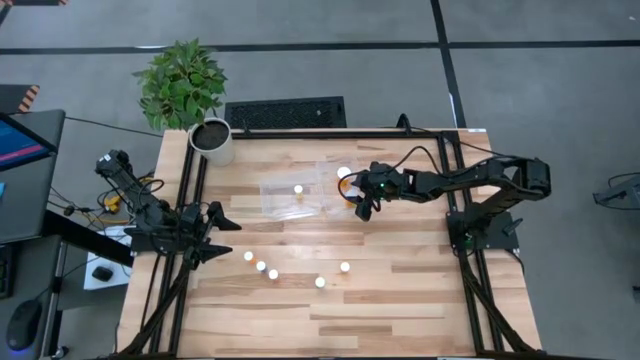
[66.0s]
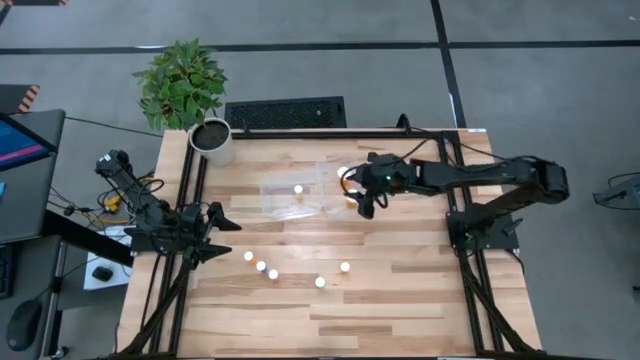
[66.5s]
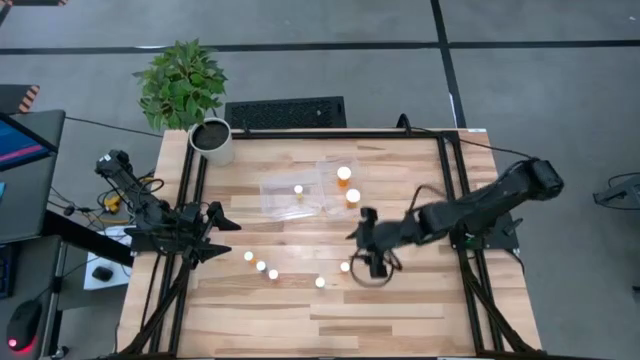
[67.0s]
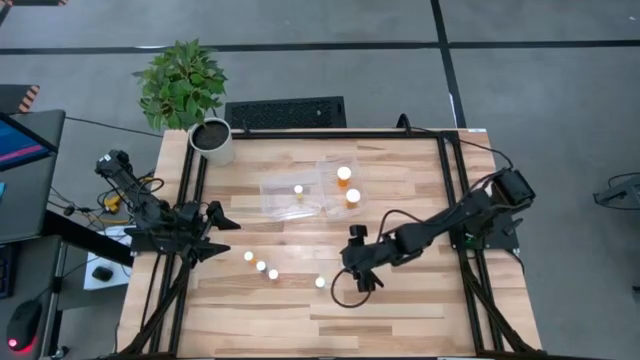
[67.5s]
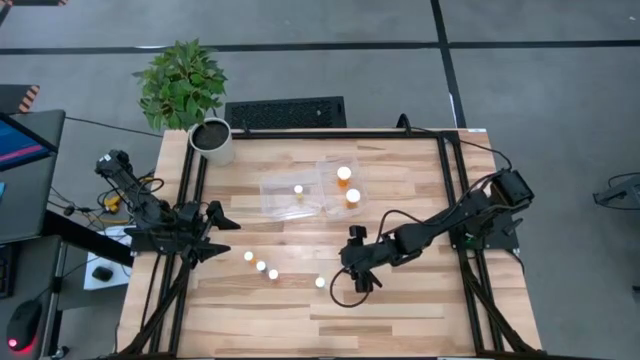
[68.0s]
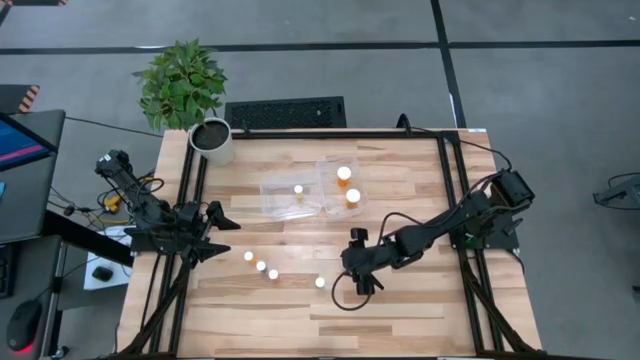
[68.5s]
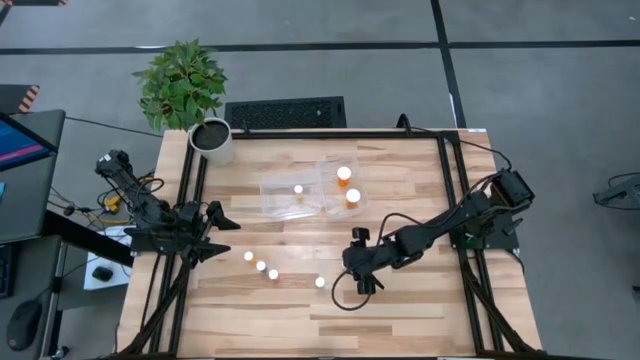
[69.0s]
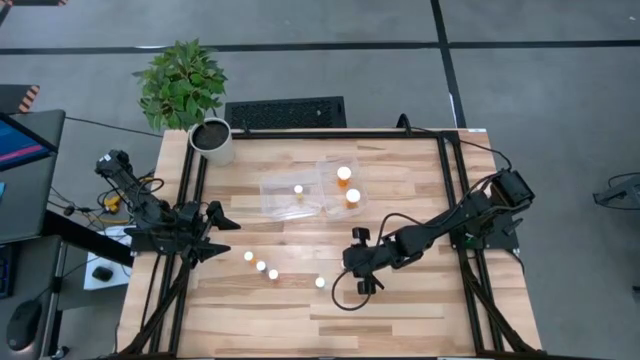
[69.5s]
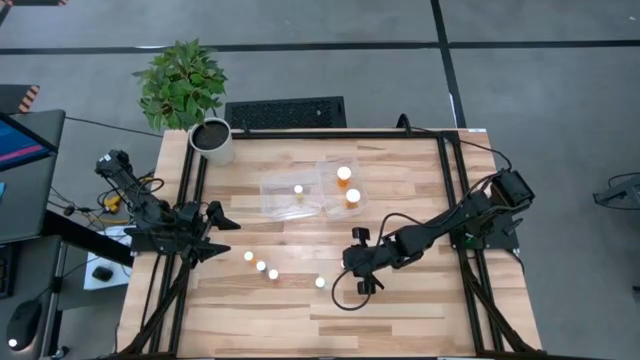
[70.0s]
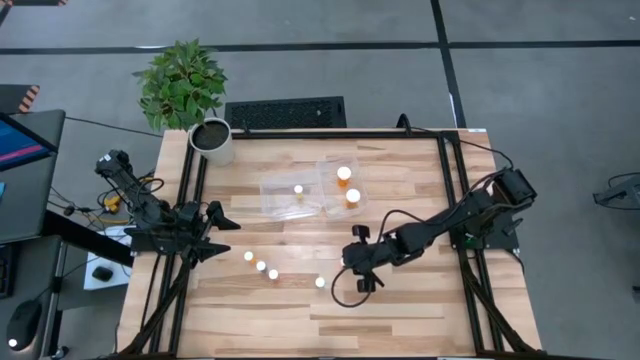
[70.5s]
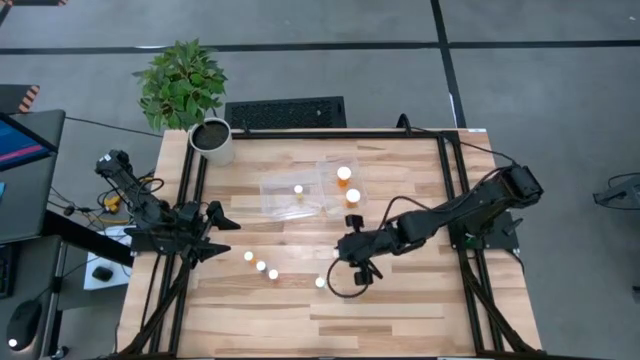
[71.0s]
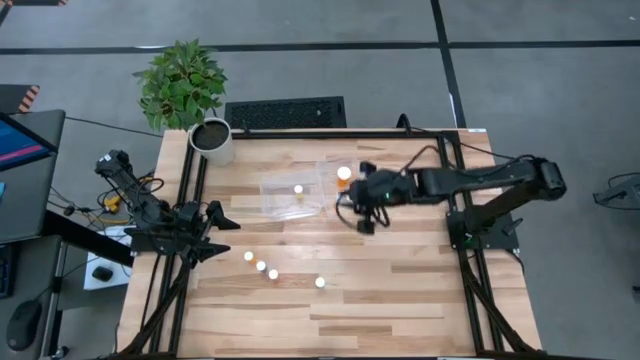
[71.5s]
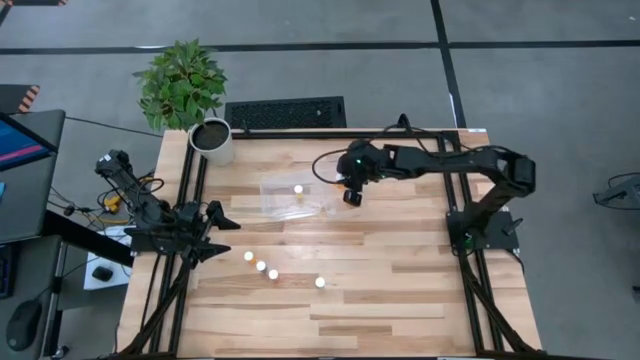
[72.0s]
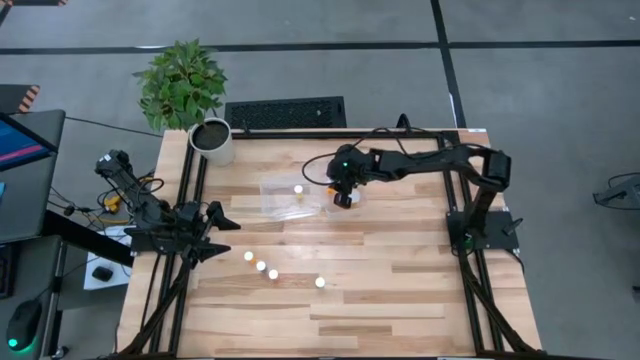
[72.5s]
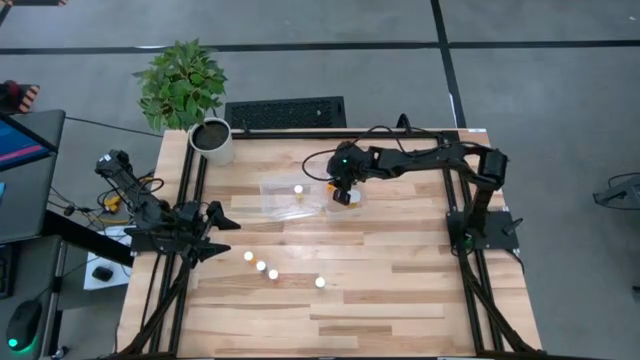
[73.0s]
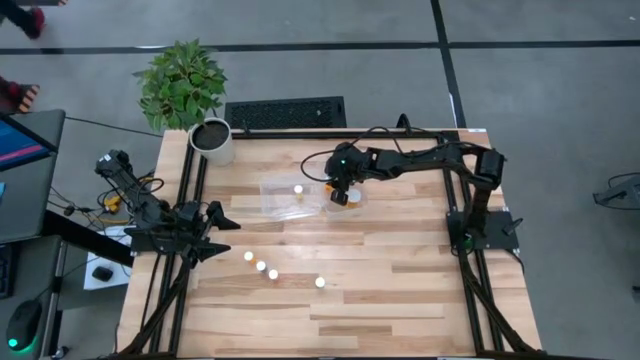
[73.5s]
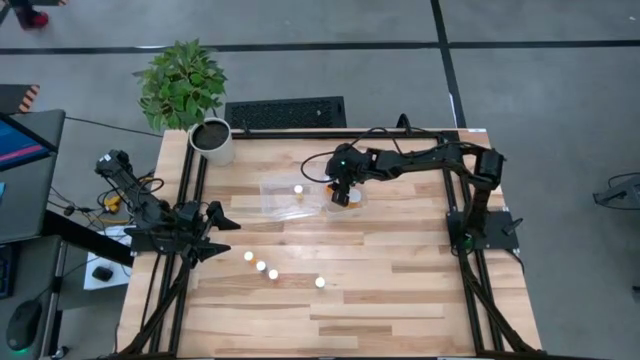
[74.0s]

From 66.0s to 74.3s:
Task: Pick and place medicine bottles into bin by pill shape (circle, oval)
Put the orange capsule bottle into the right transparent bin

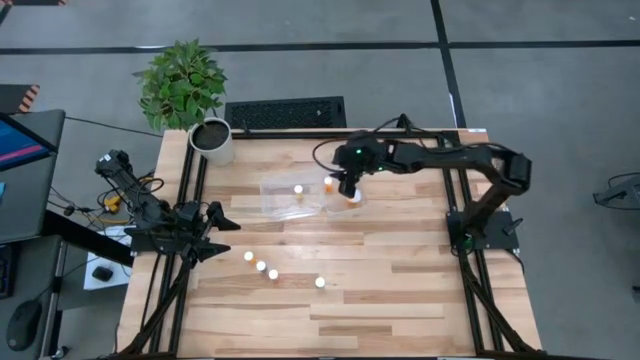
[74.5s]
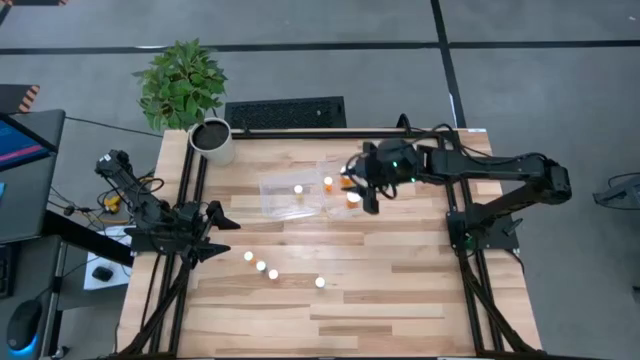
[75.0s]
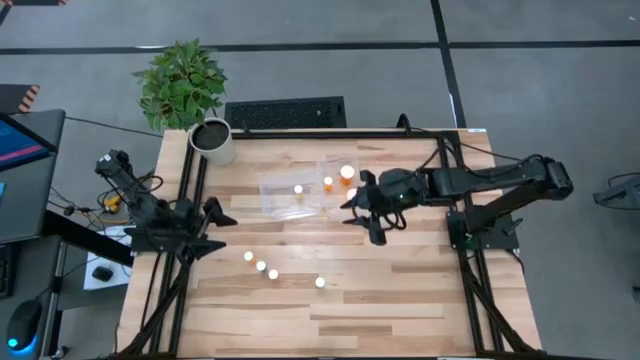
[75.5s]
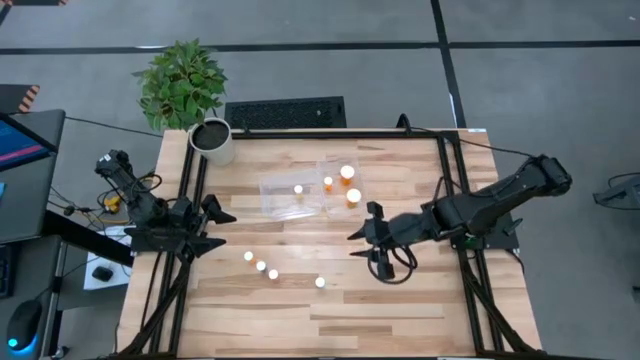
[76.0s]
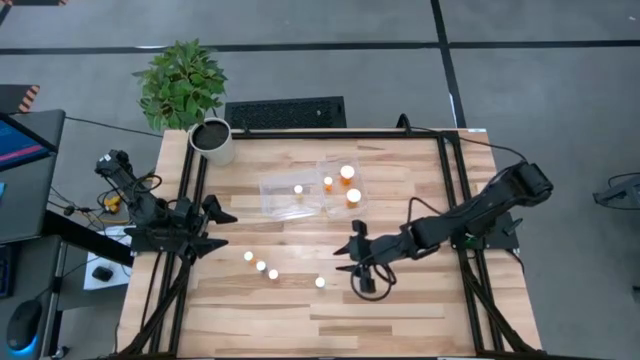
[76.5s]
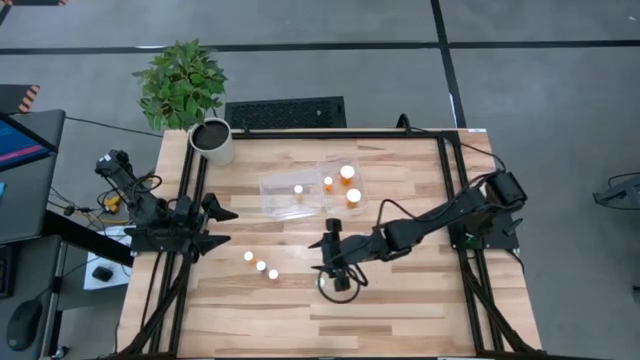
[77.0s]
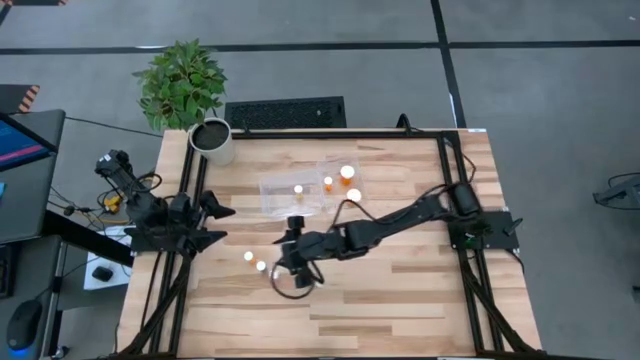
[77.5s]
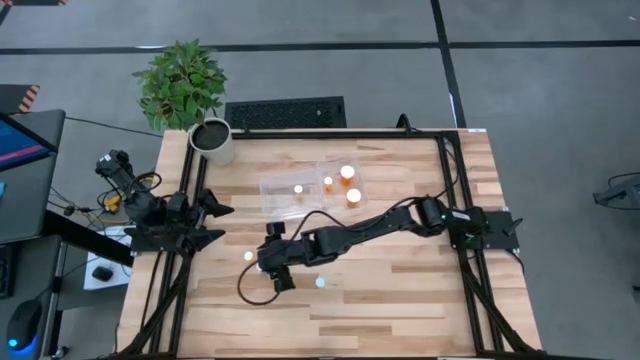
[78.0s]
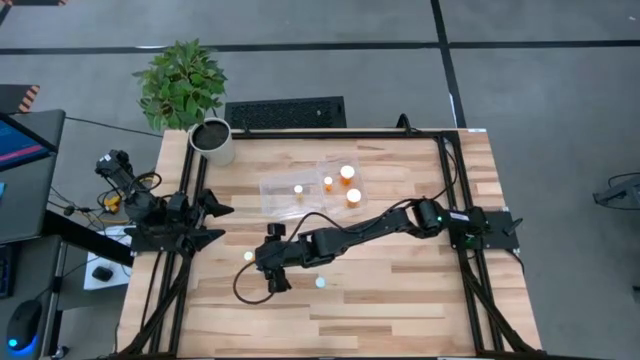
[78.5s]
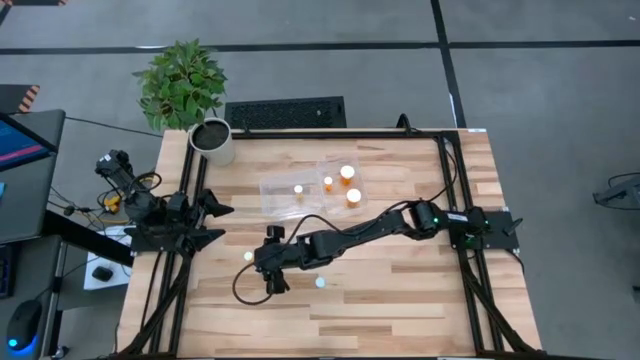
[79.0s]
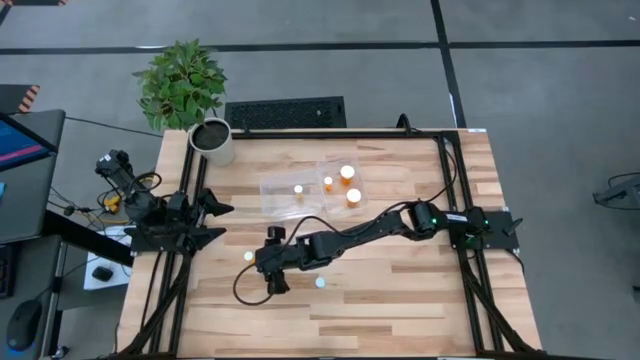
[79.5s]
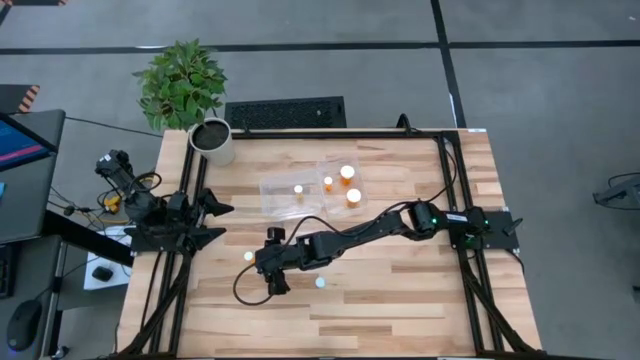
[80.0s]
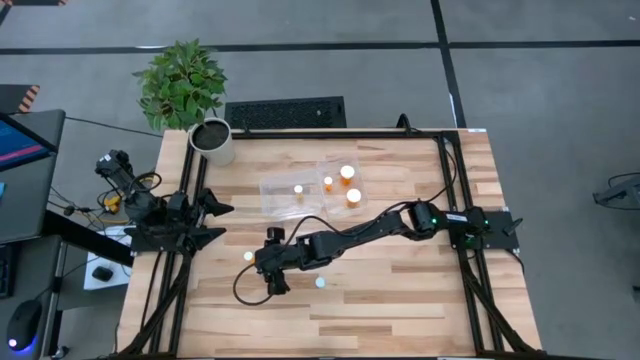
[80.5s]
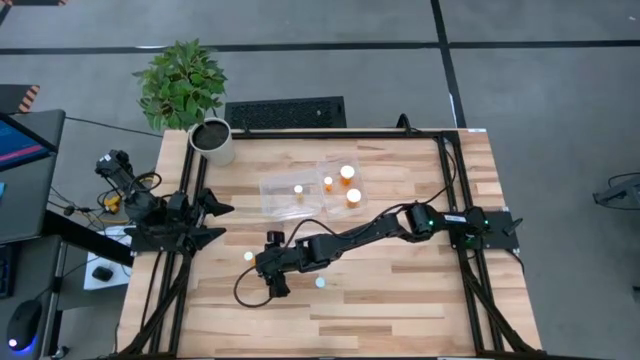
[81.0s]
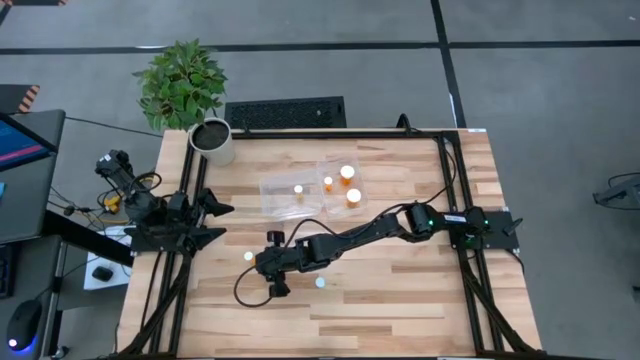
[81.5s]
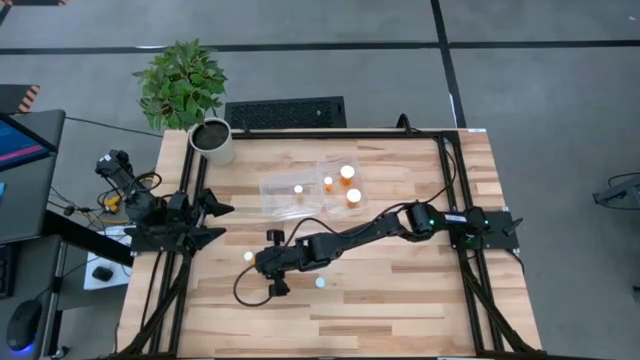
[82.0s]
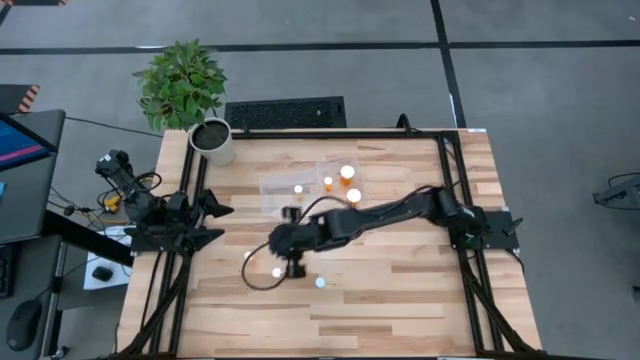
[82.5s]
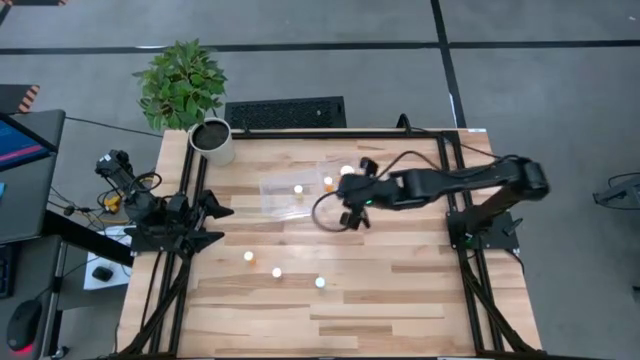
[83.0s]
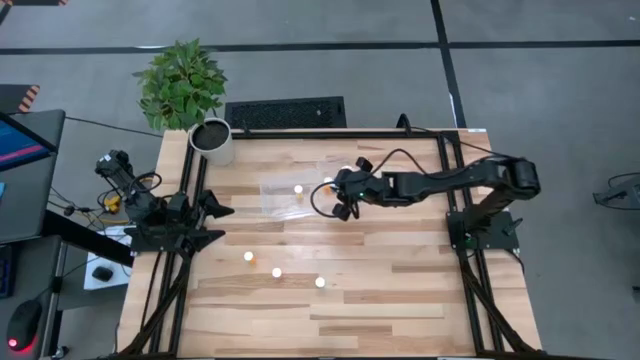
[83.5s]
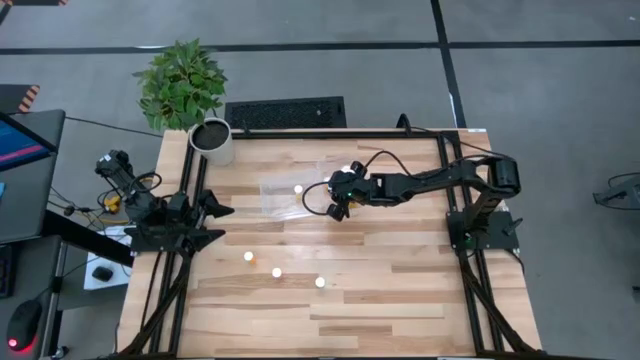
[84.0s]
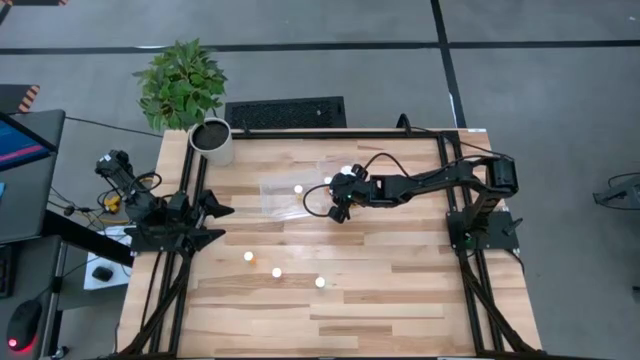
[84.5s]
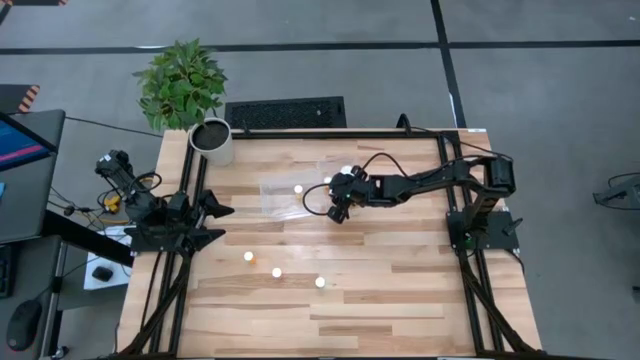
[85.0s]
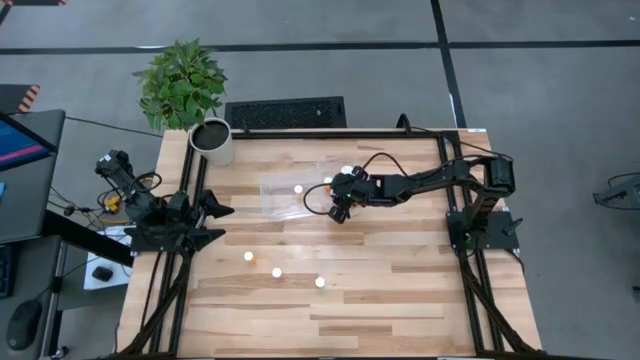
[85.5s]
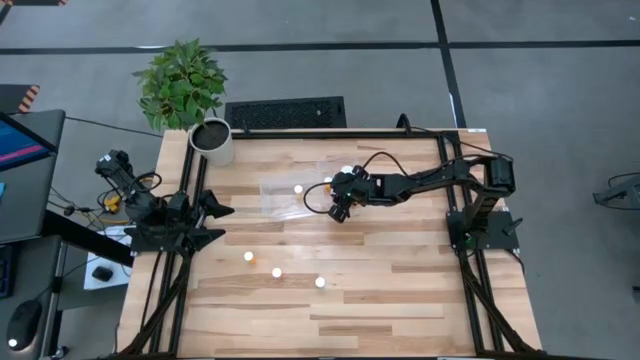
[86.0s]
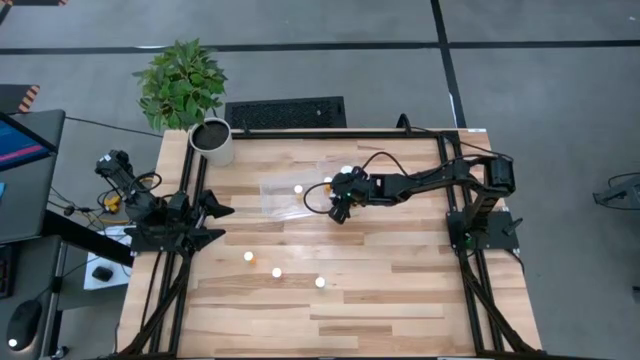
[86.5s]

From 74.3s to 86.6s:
Put the blue capsule bottle into the right transparent bin
